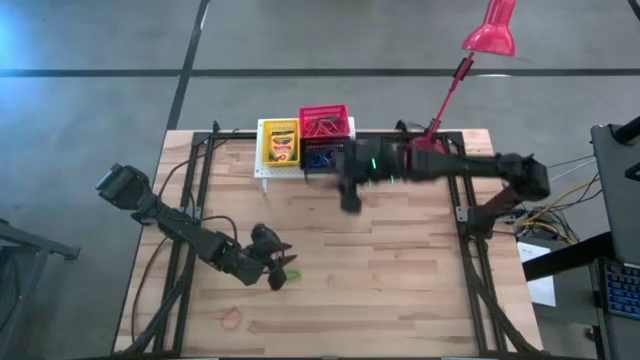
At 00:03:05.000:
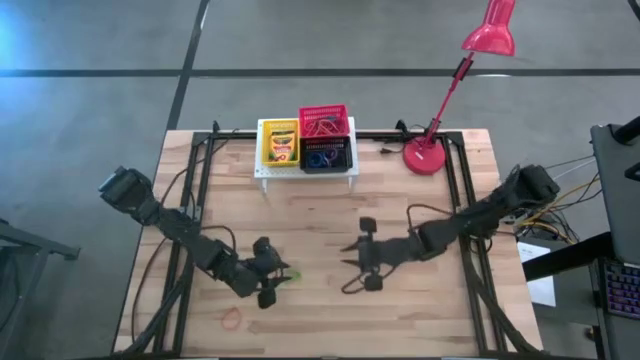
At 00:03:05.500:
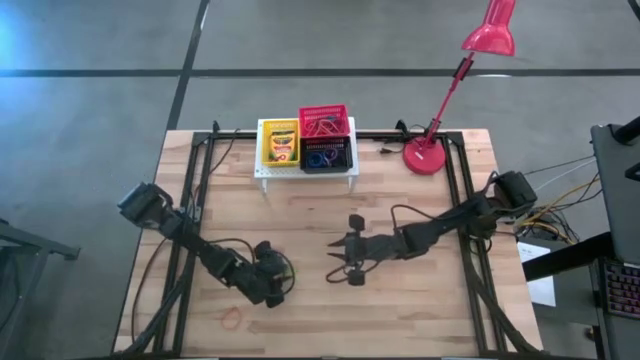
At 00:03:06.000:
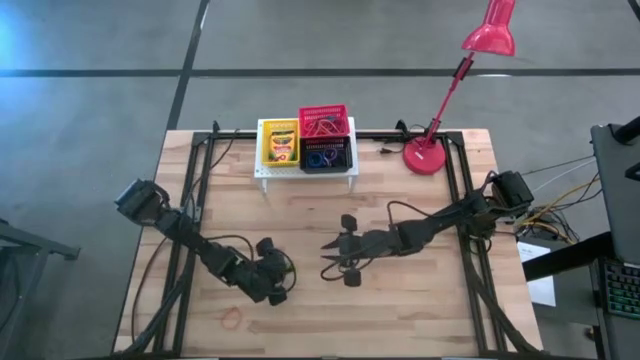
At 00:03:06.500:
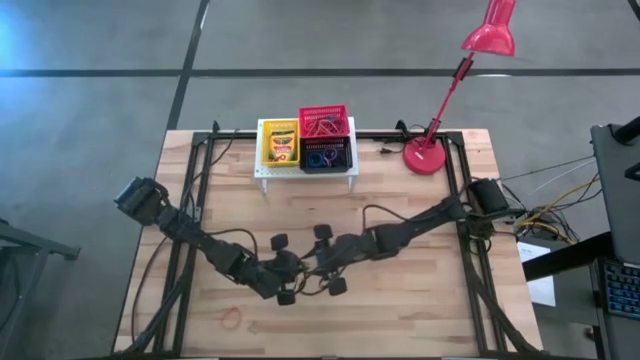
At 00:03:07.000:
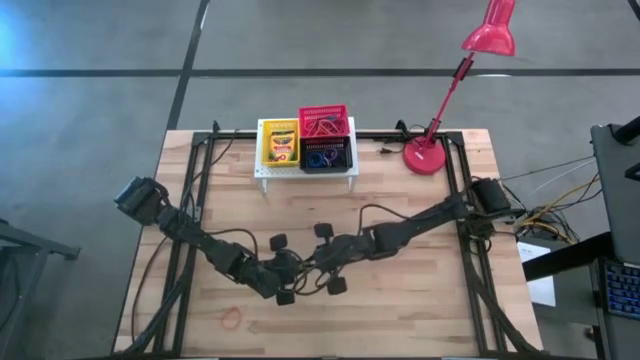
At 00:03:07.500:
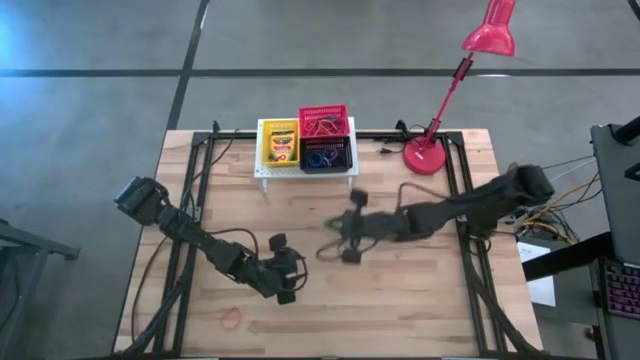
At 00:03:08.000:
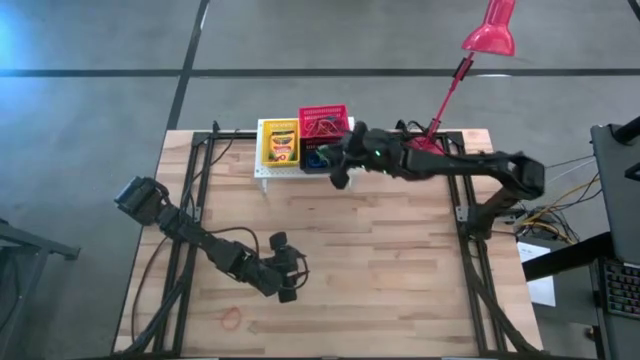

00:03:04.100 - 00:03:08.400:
Task: Pick & Place Office Desk Supplies
Put the green spring keychain into the black bin

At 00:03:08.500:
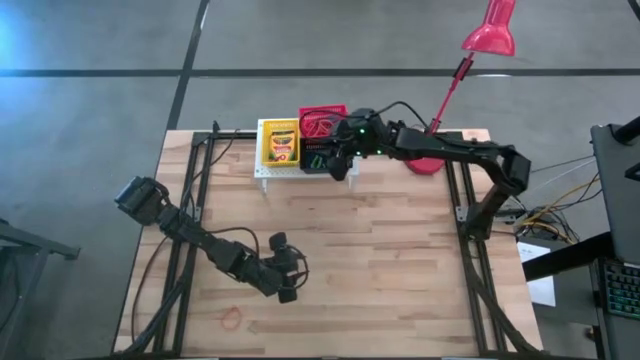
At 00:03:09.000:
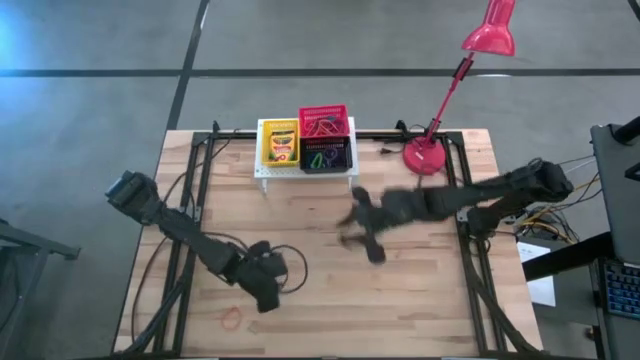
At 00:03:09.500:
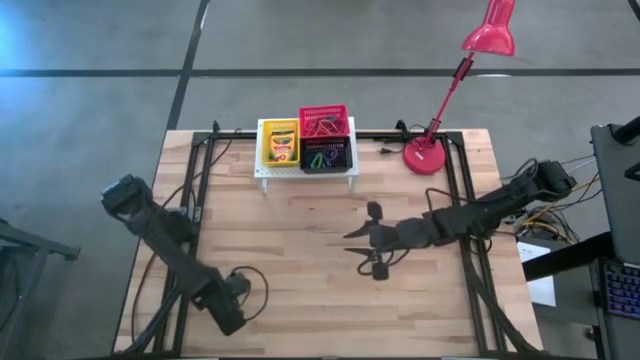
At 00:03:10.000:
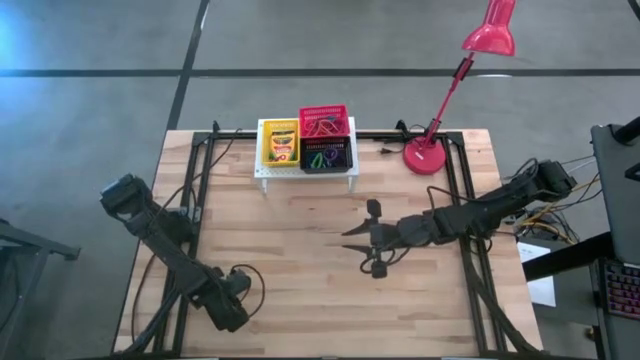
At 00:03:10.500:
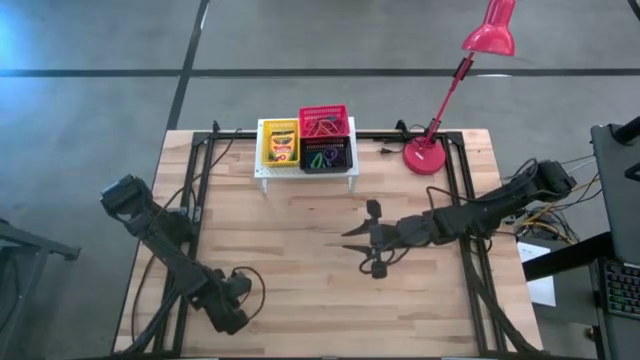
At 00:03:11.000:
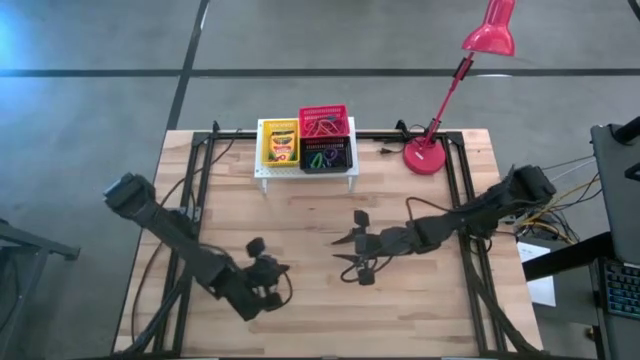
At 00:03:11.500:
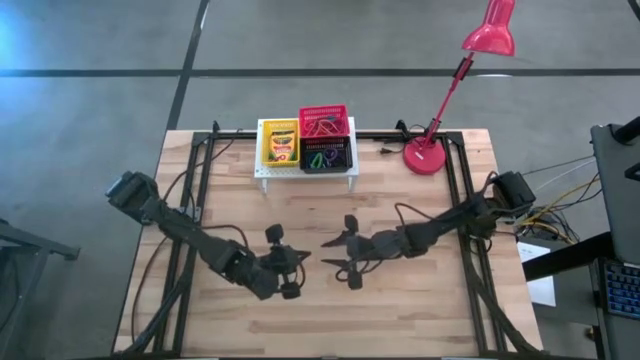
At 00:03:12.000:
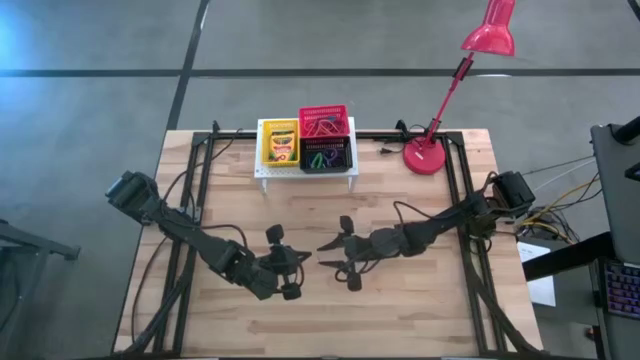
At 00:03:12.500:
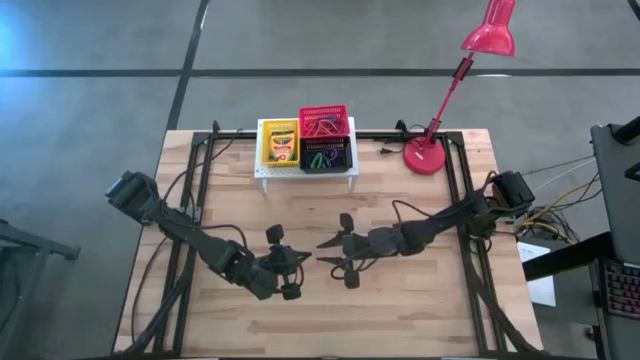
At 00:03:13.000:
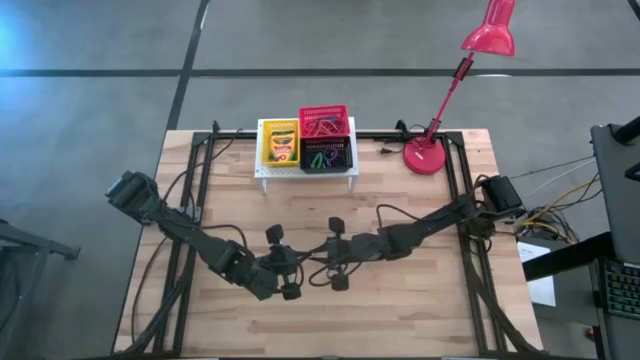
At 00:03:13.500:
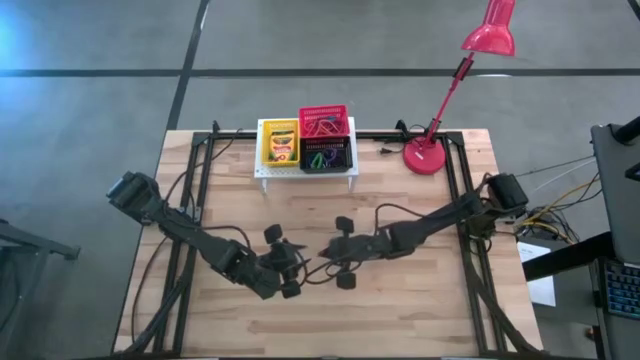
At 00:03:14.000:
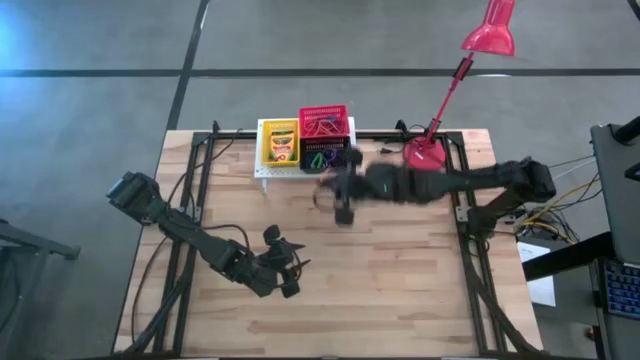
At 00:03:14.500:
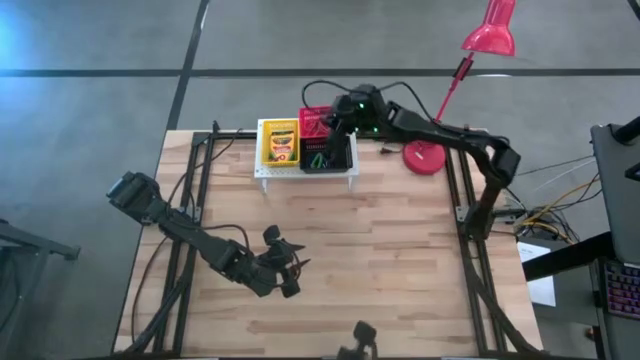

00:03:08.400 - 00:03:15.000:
Put the orange rubber band into the red bin

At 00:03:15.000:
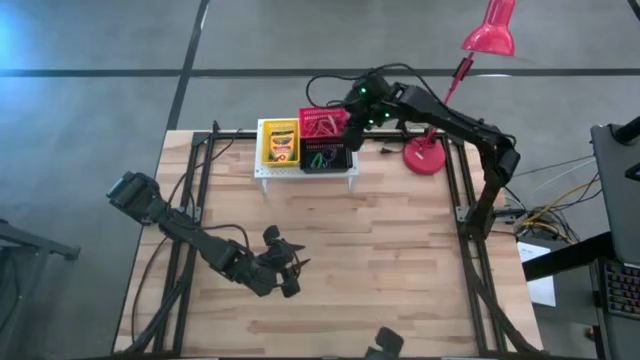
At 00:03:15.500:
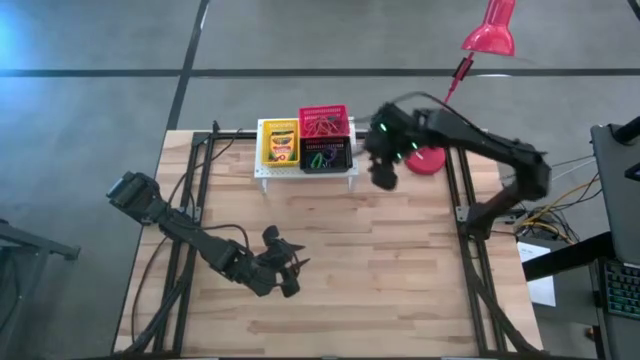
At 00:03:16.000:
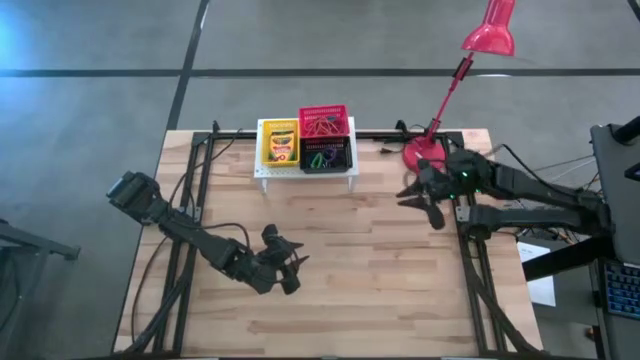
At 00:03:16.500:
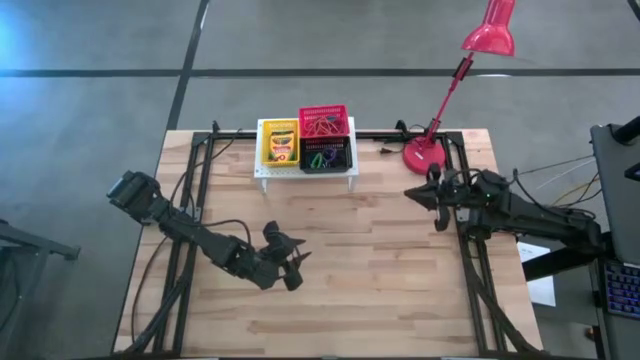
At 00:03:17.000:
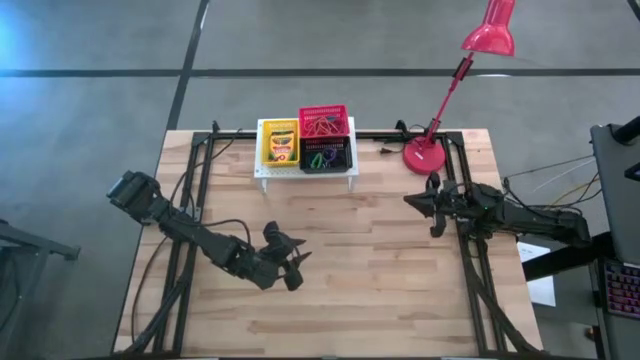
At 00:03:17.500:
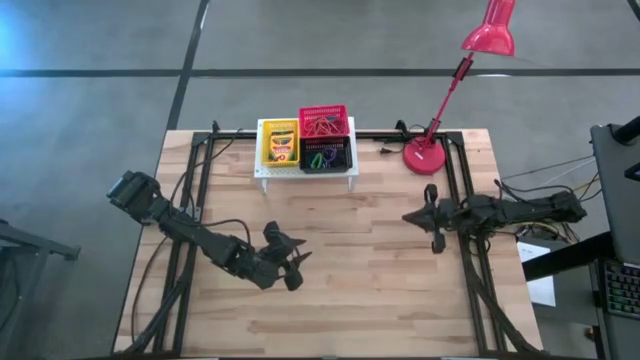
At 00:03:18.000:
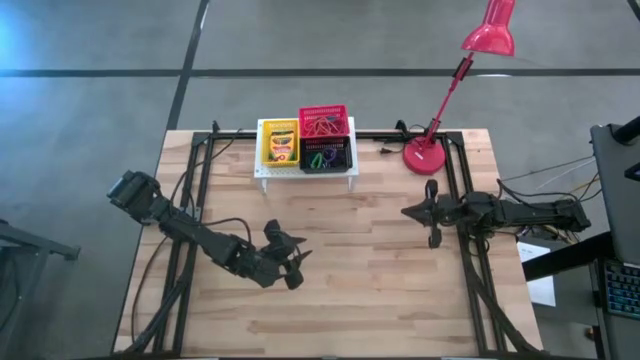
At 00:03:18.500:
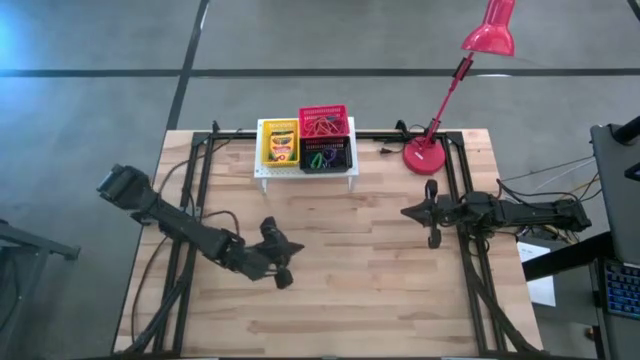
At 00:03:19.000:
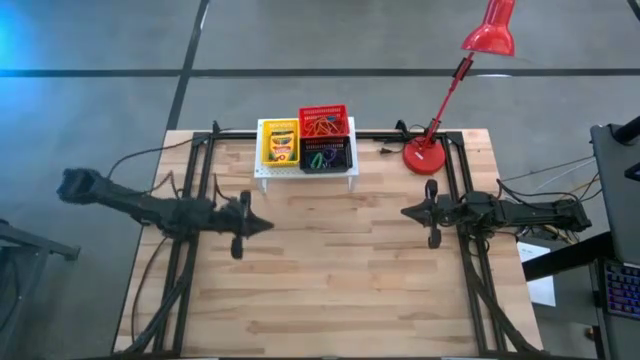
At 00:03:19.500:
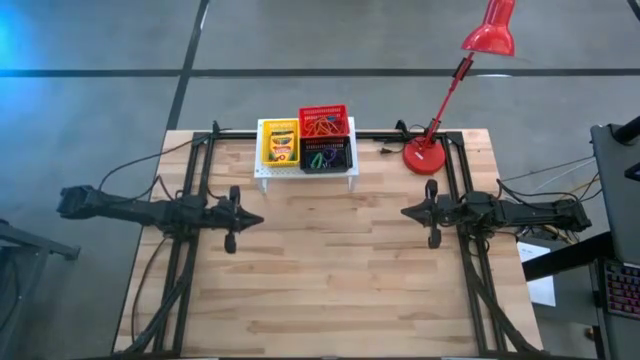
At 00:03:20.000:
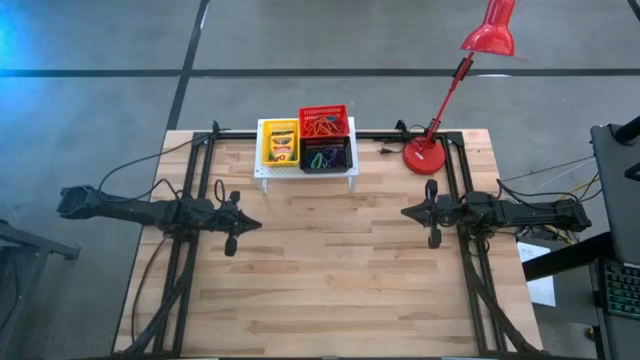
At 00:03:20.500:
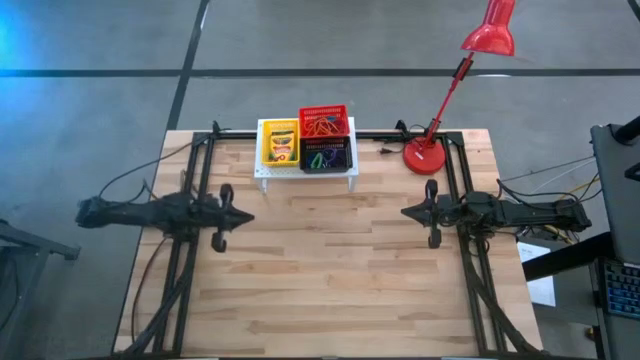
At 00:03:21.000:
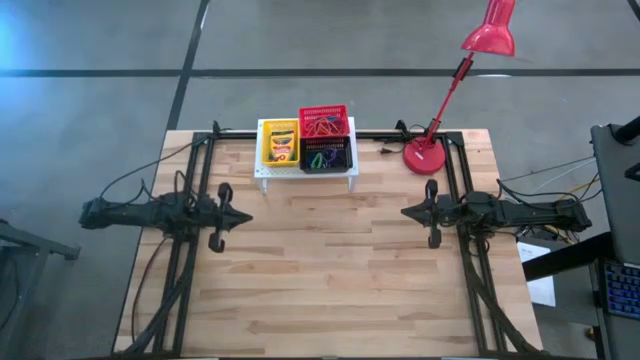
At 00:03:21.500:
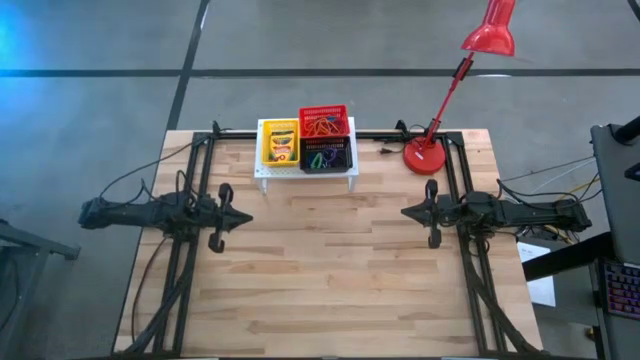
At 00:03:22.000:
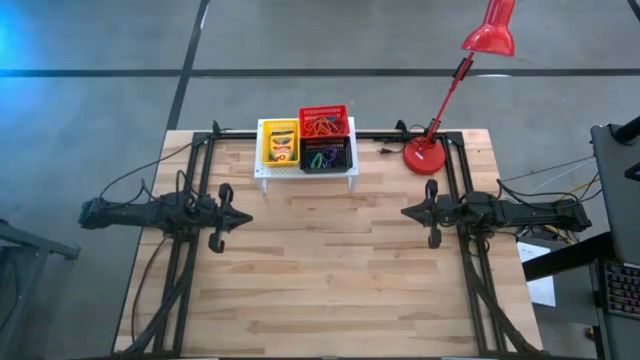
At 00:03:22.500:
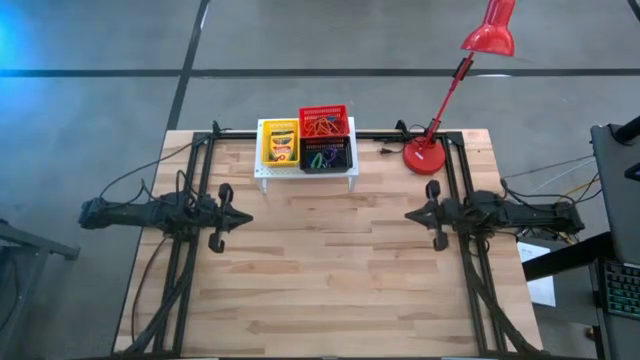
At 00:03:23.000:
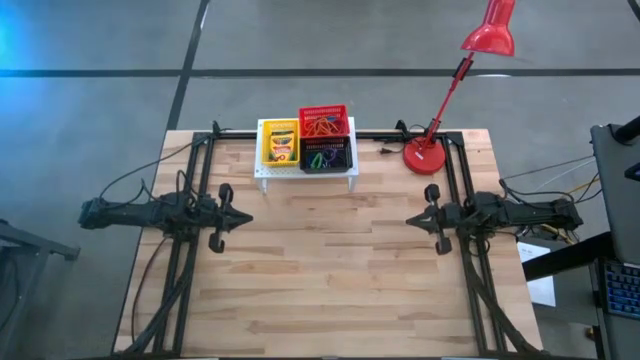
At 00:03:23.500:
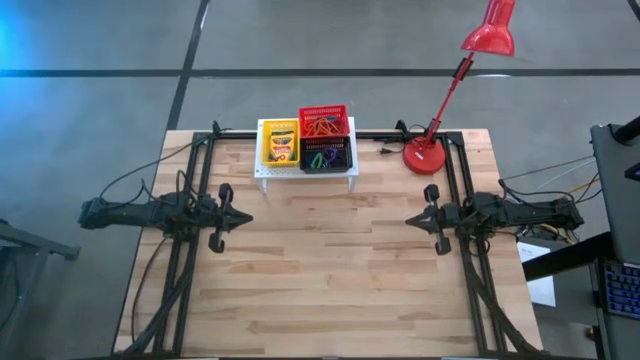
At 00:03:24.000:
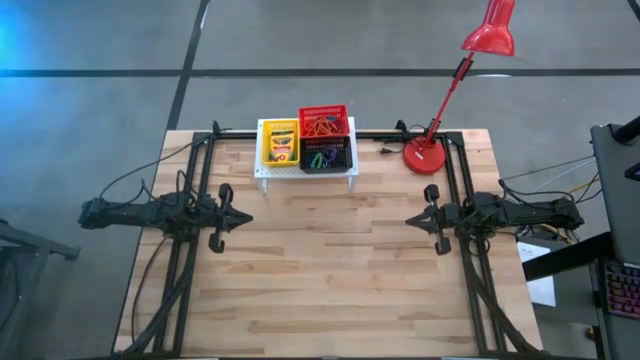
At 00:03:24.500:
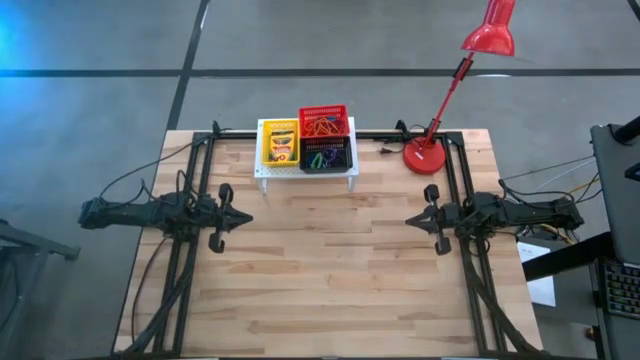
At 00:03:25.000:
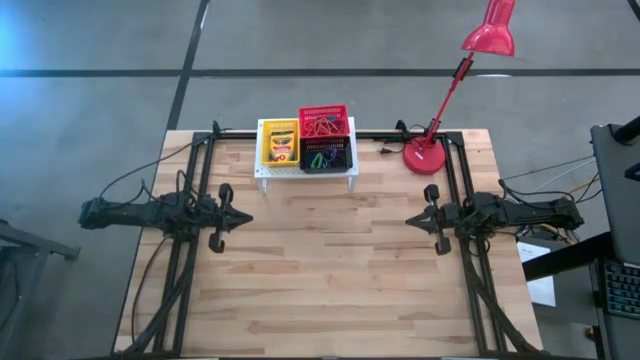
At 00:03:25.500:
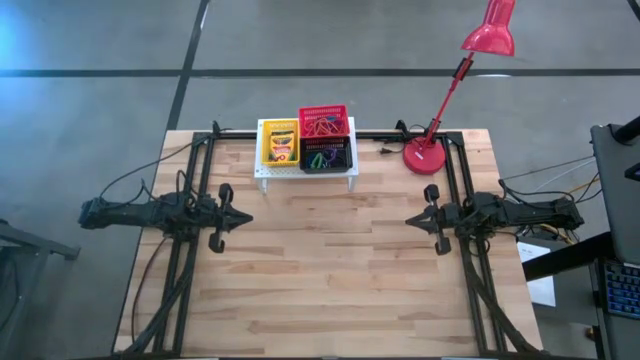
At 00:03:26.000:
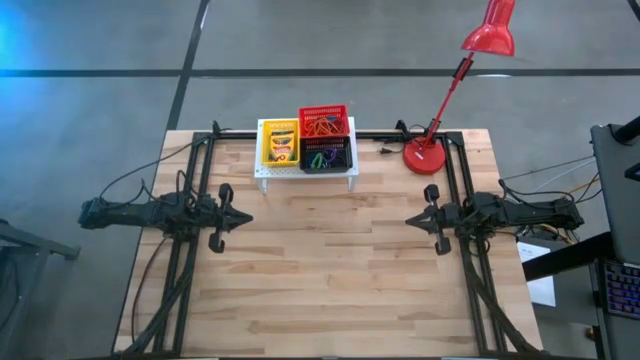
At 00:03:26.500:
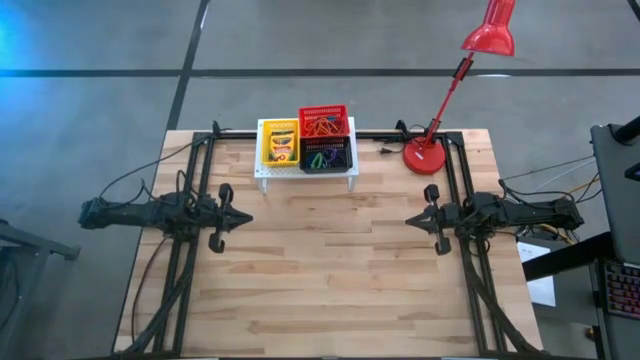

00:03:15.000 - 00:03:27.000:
Return to Home Position
